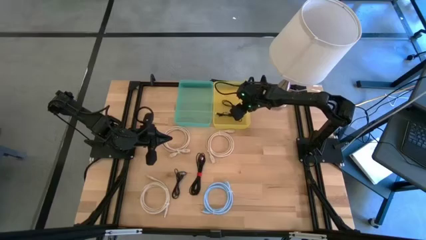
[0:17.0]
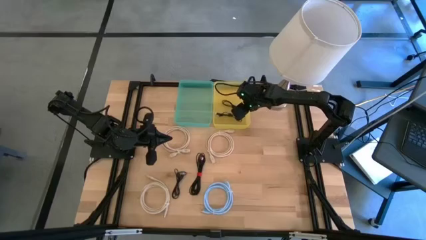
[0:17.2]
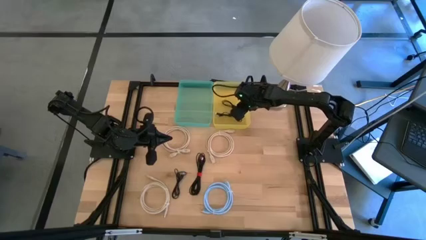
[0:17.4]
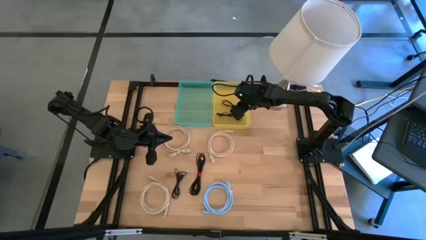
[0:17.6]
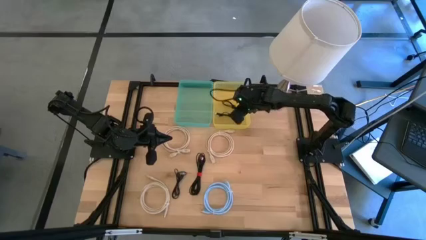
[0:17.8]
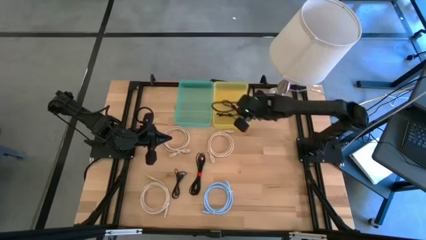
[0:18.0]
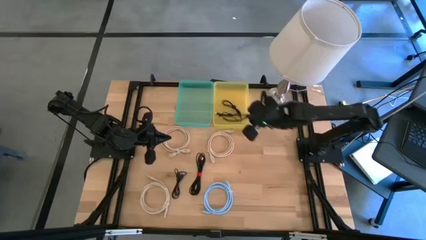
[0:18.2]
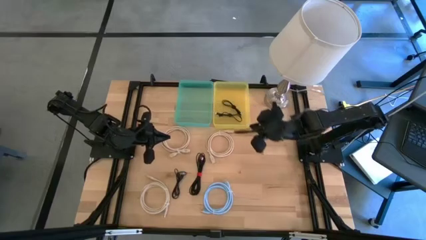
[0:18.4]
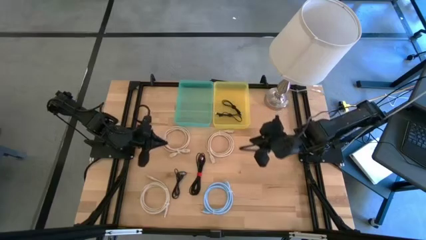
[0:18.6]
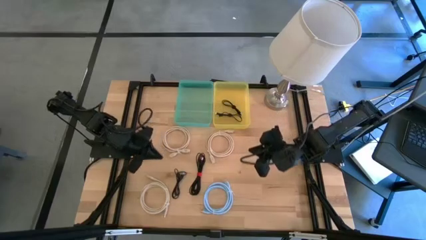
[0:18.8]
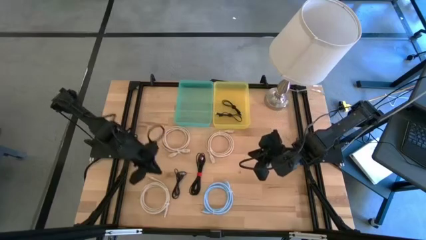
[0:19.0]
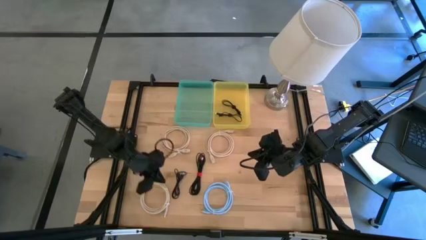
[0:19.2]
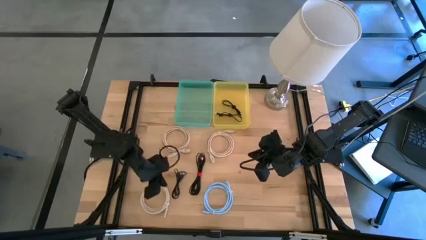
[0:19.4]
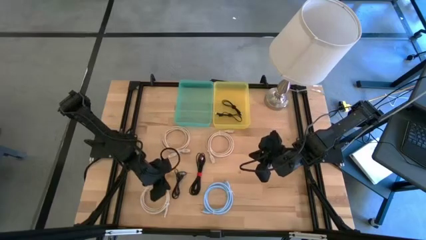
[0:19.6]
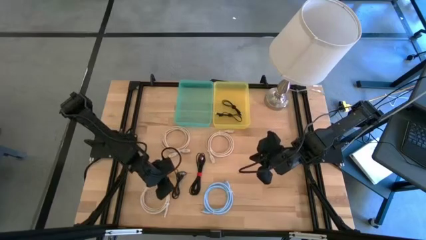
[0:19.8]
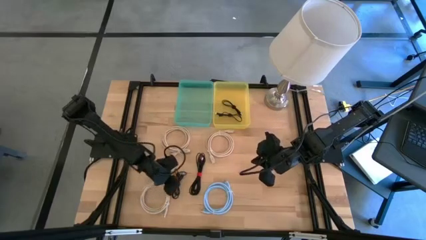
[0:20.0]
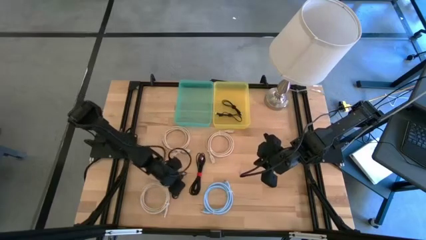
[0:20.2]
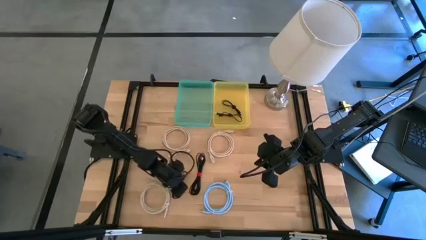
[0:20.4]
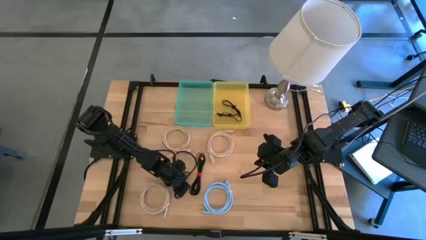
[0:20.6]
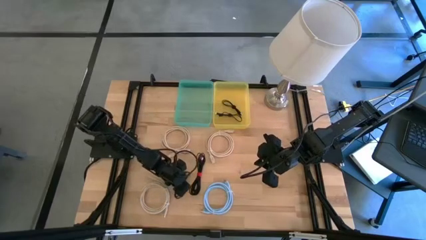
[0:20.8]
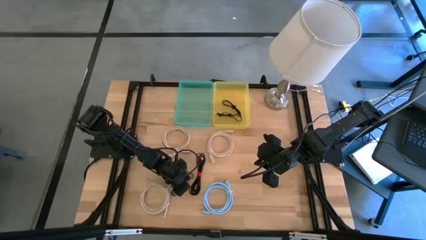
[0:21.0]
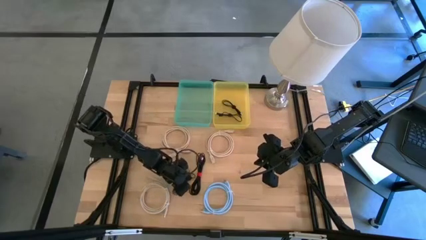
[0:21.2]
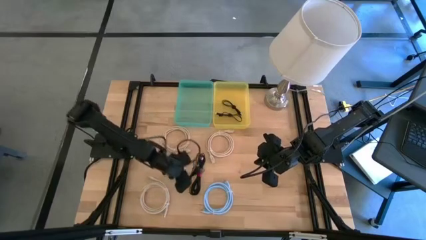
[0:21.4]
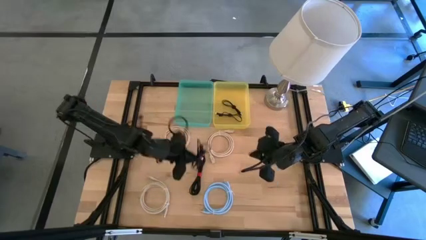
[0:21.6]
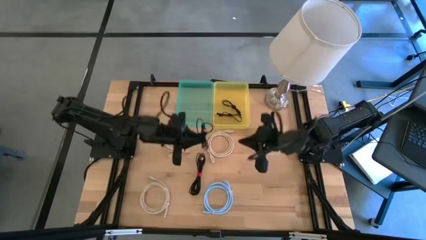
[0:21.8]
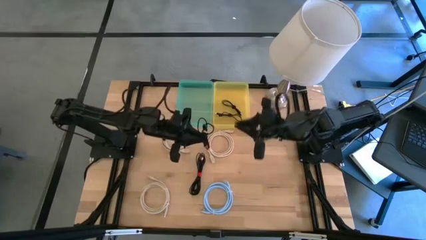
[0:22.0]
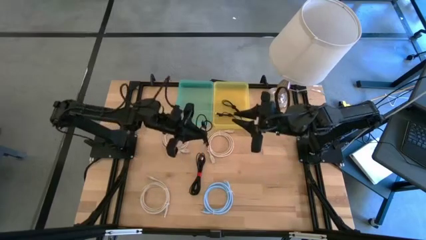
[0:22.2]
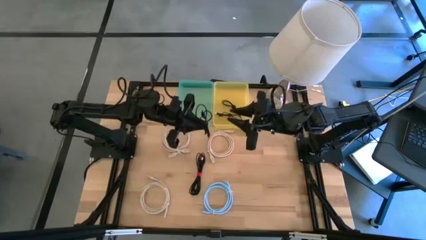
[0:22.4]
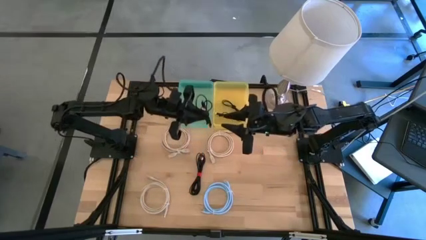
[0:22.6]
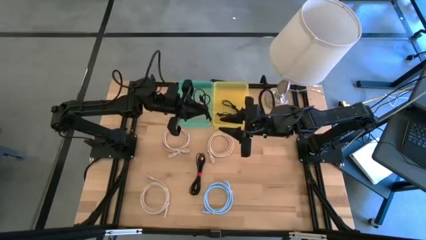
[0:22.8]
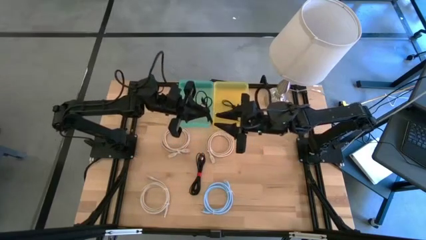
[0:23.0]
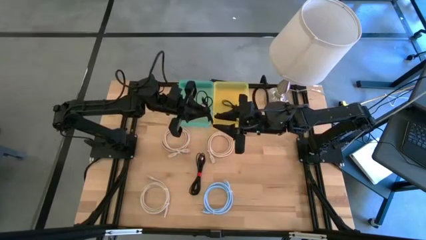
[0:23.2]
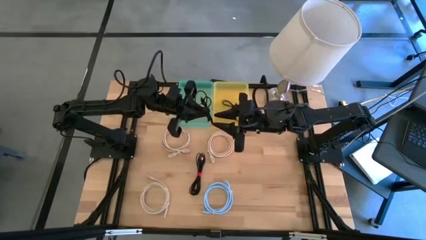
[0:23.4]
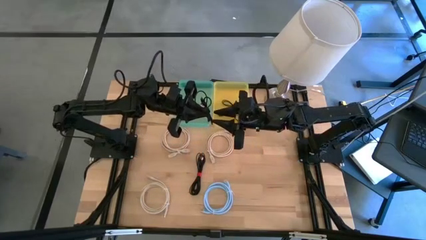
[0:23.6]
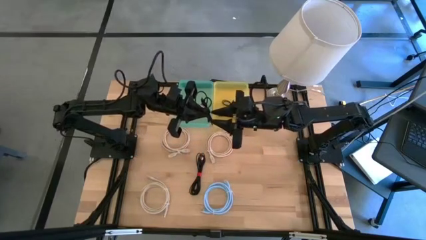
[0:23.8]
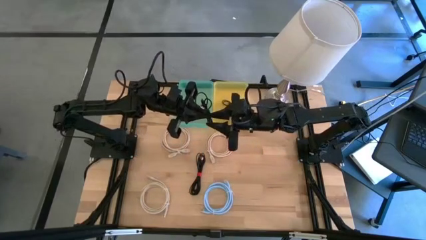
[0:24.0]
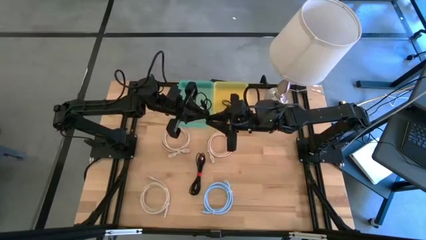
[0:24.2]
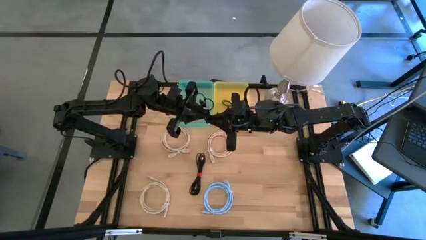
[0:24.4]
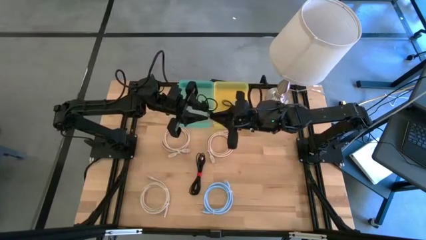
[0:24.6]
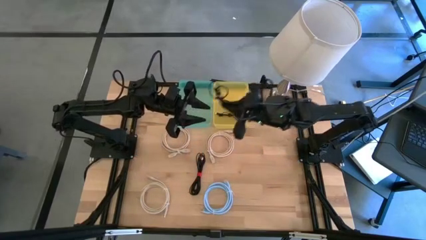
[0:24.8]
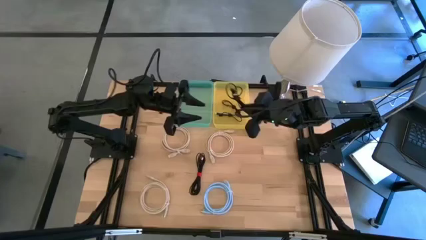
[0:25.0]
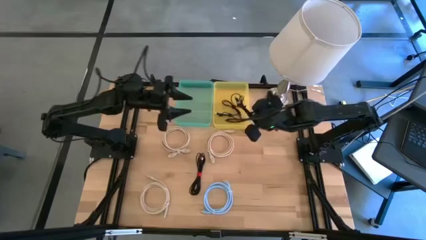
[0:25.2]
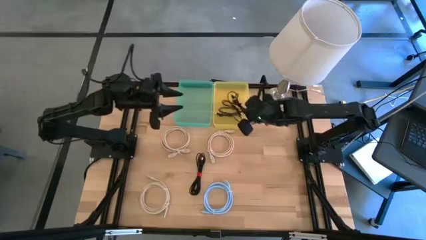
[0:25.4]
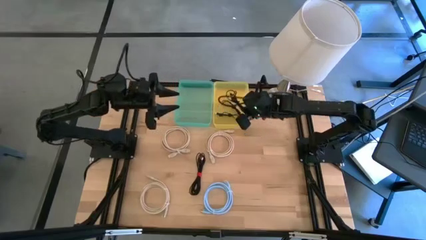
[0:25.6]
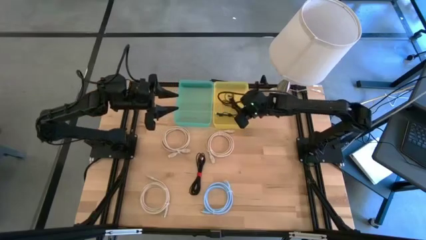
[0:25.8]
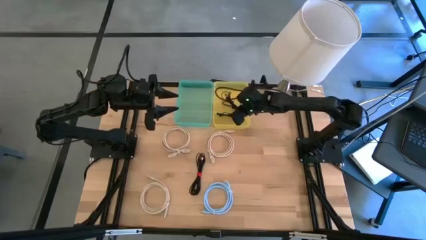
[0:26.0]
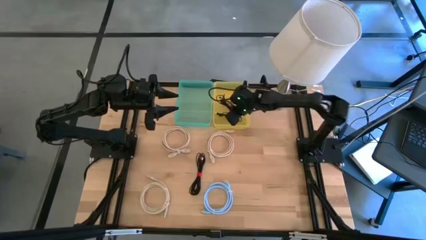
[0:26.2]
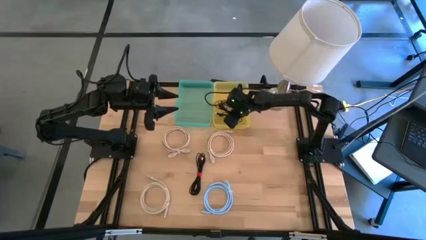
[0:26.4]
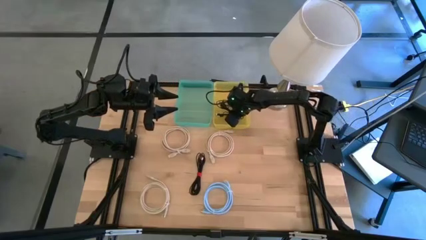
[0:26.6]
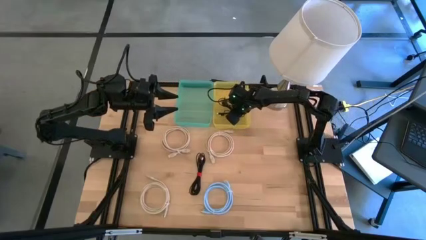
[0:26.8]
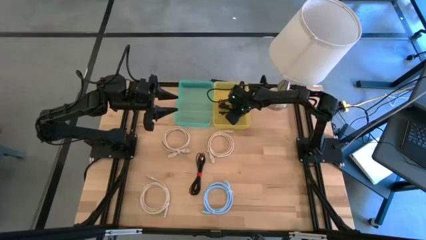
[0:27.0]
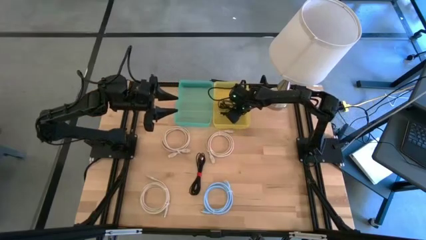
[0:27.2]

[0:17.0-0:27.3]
Put the left black charger cable into the yellow bin

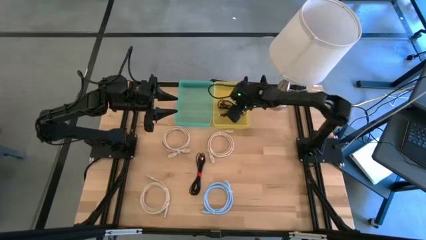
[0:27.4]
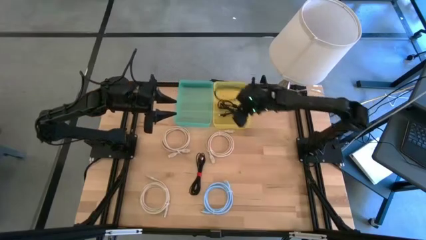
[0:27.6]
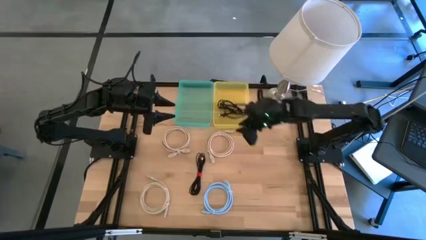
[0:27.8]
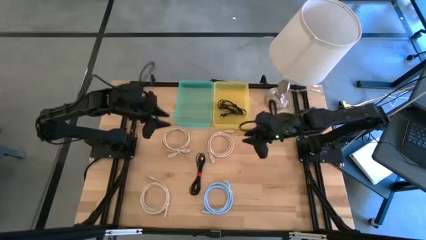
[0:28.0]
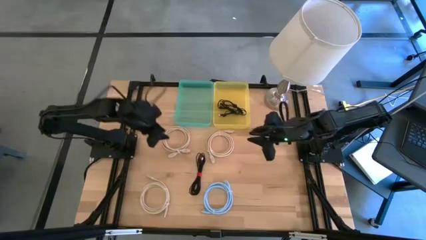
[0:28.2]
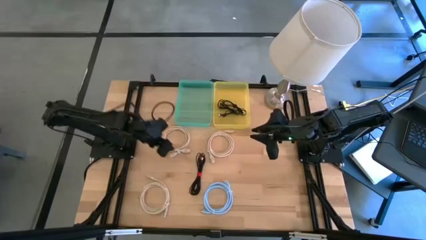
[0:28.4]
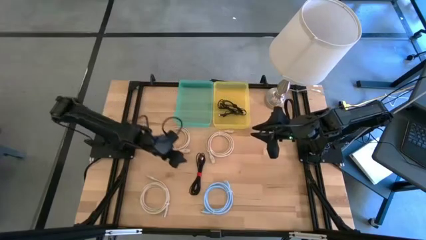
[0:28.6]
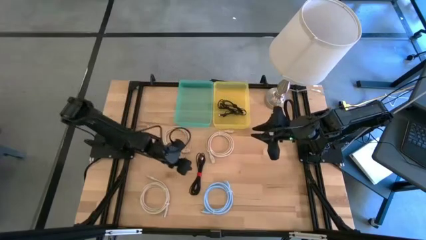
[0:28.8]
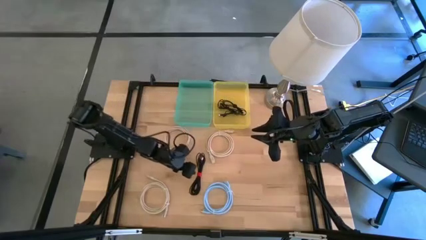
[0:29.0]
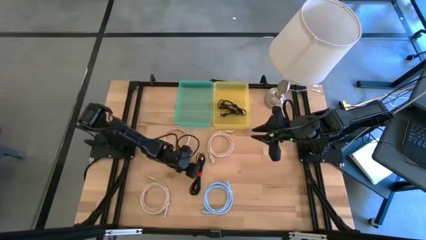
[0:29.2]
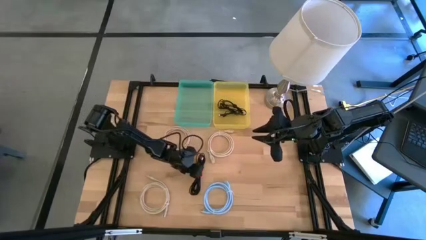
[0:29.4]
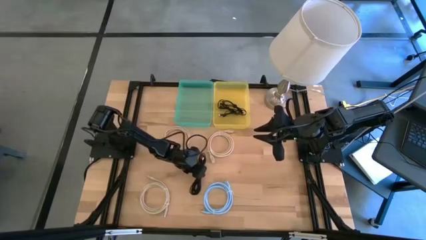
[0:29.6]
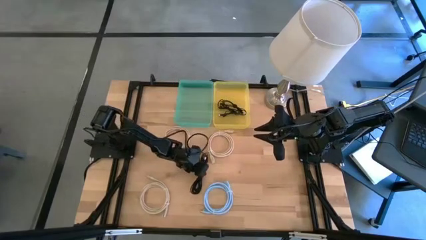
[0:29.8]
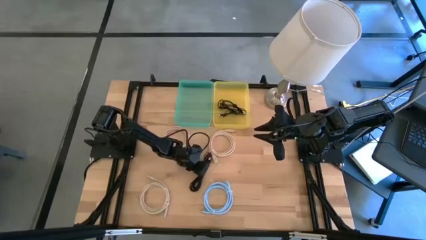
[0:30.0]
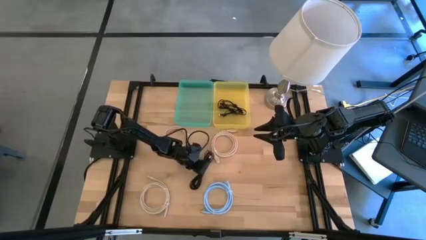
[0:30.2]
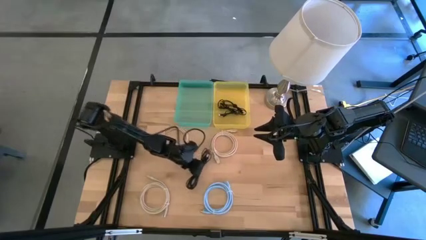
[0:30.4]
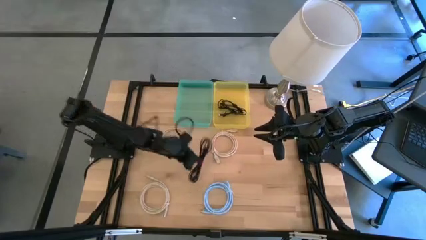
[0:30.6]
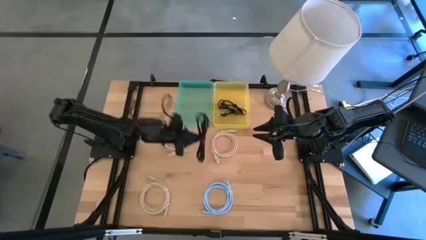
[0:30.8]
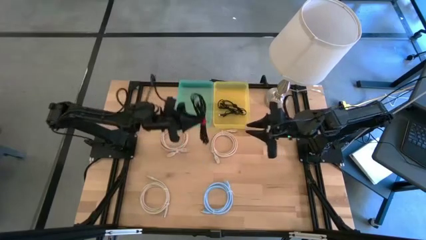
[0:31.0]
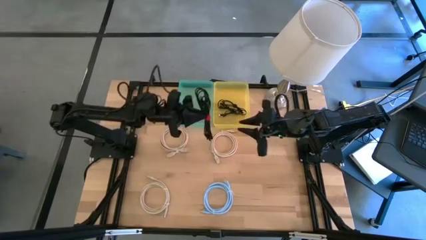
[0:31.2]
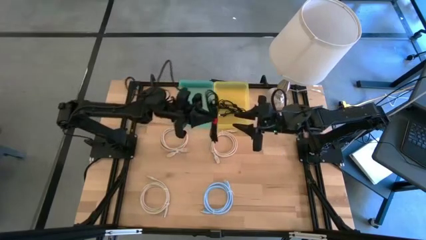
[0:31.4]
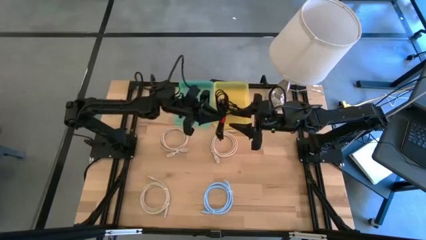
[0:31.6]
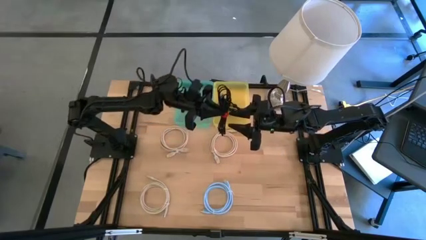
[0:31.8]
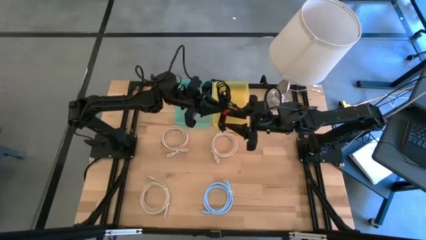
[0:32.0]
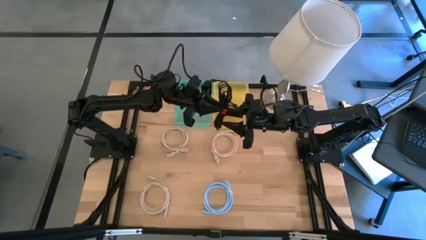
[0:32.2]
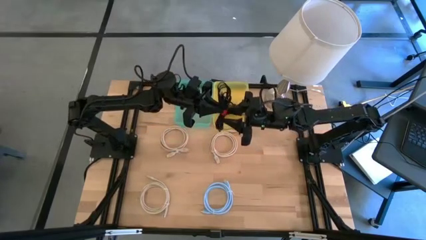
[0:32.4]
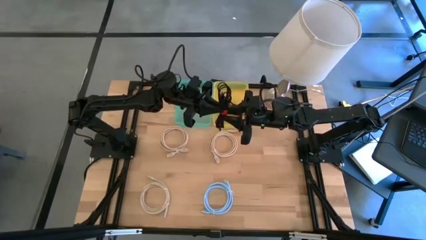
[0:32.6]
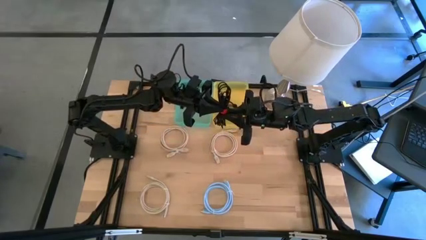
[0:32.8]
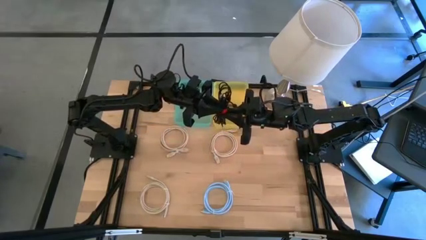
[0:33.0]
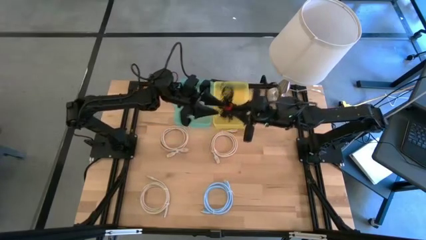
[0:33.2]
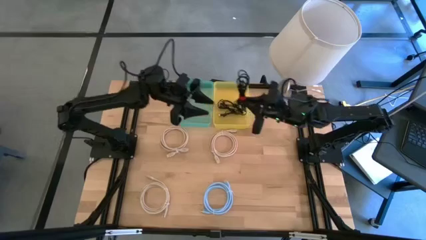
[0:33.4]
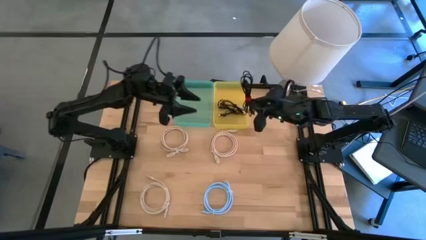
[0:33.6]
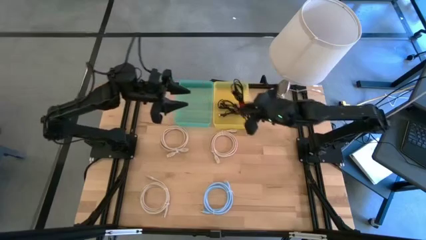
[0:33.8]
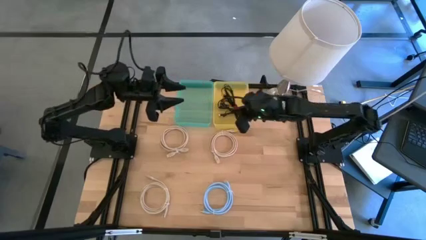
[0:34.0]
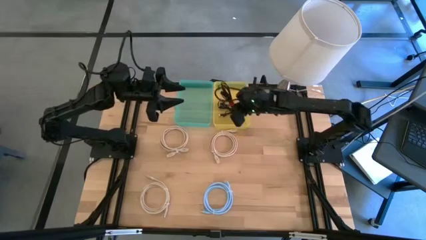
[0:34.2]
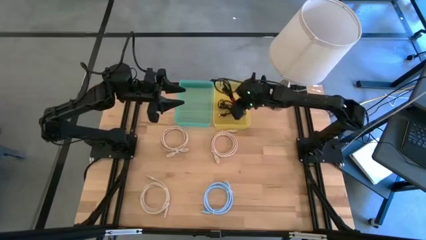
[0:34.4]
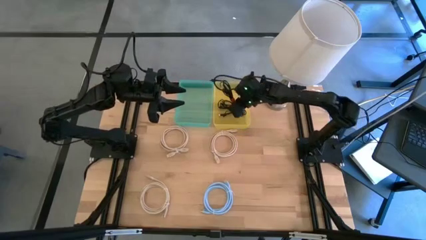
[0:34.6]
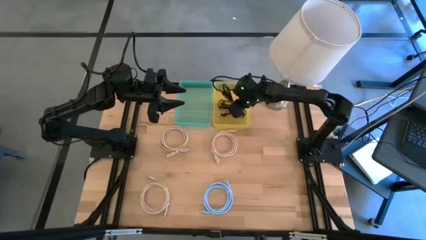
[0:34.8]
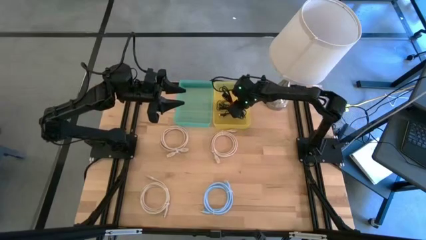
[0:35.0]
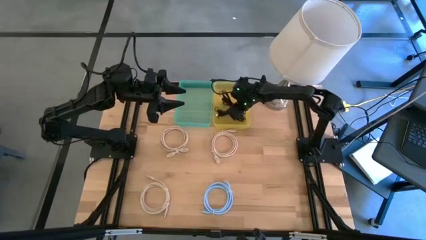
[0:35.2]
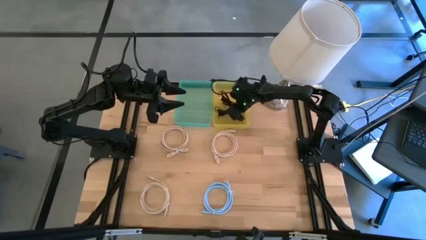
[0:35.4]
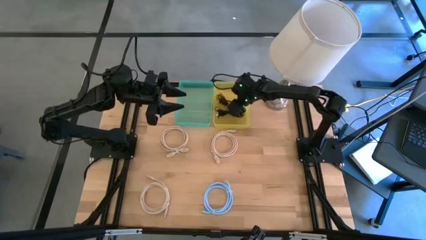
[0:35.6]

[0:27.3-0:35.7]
Put the black charger cable into the yellow bin
